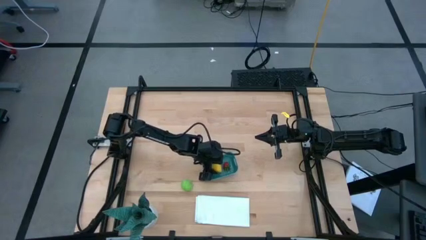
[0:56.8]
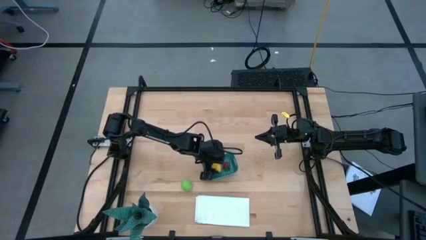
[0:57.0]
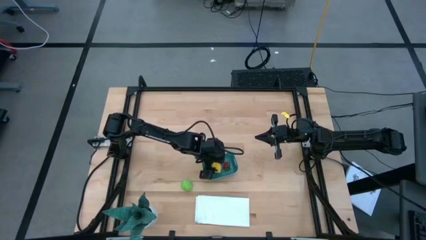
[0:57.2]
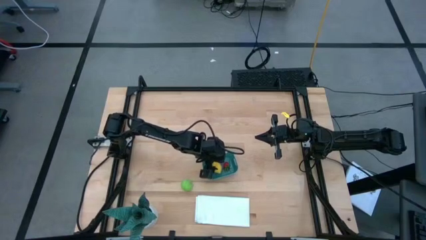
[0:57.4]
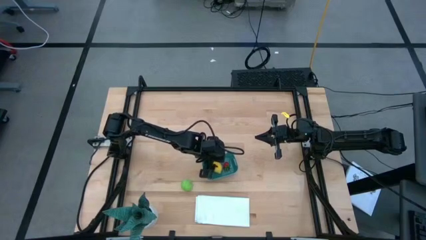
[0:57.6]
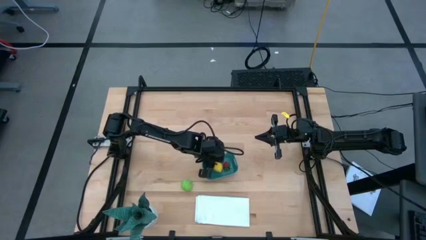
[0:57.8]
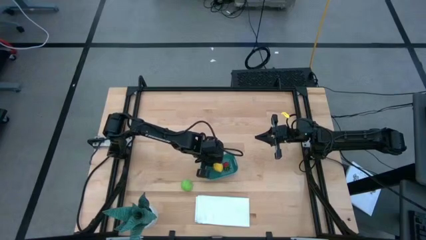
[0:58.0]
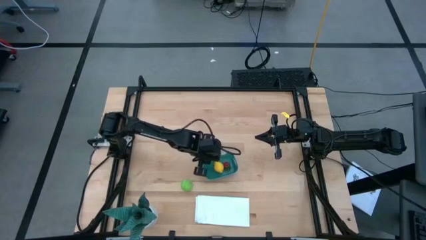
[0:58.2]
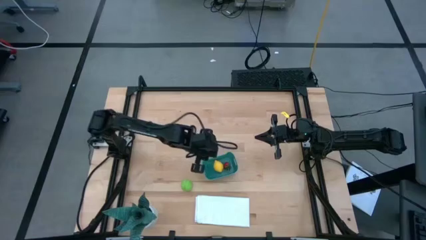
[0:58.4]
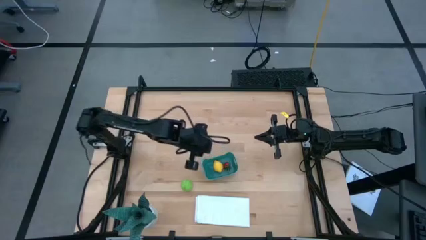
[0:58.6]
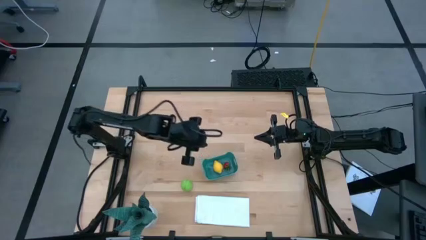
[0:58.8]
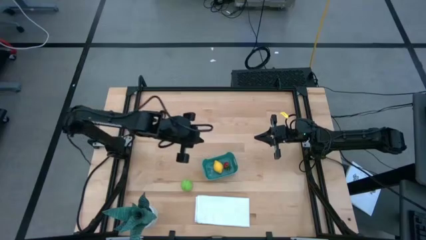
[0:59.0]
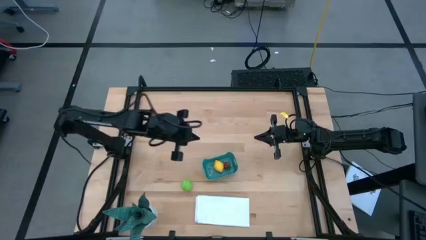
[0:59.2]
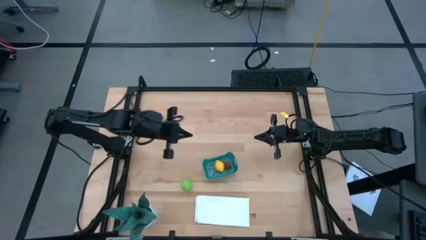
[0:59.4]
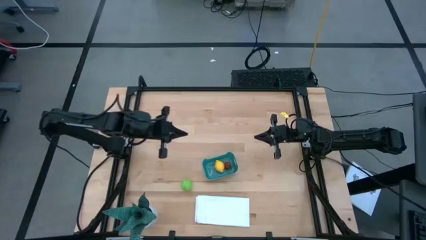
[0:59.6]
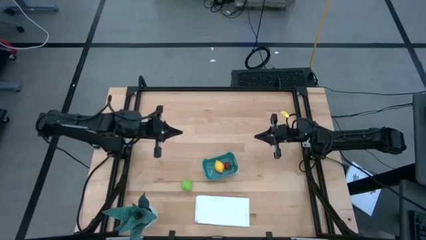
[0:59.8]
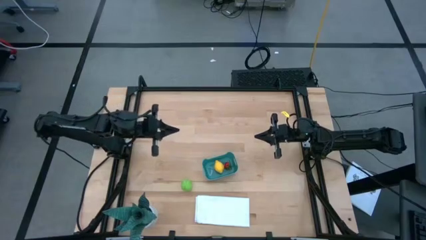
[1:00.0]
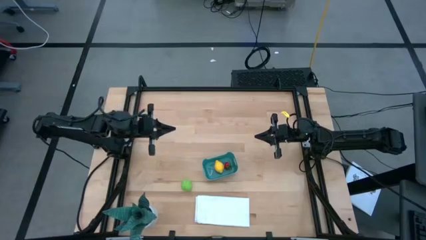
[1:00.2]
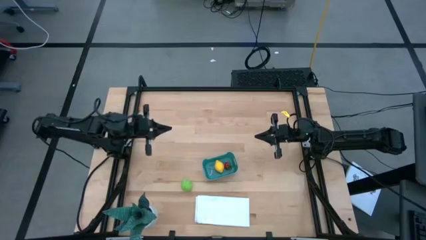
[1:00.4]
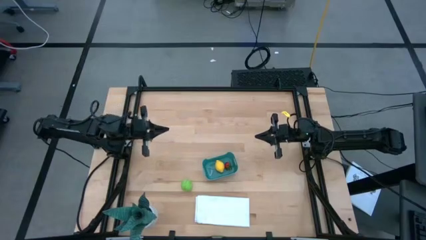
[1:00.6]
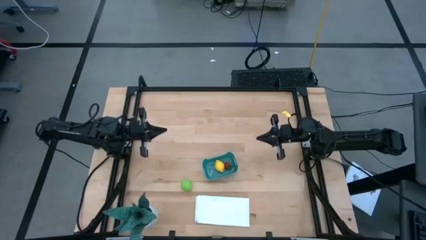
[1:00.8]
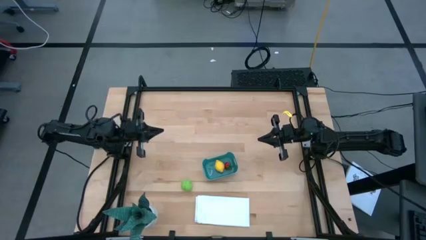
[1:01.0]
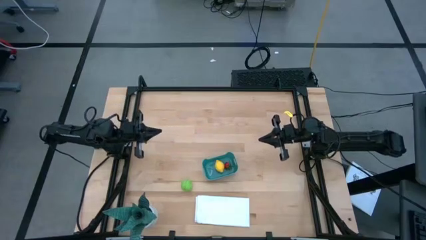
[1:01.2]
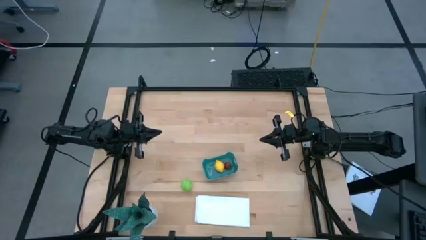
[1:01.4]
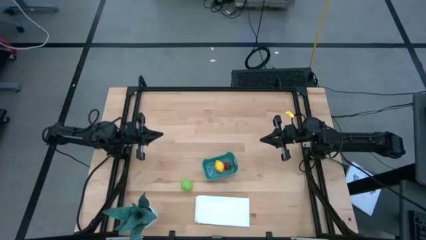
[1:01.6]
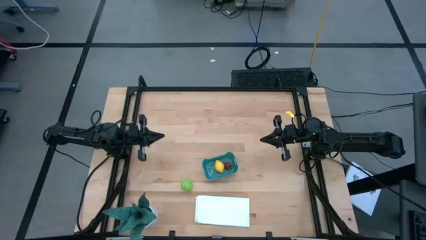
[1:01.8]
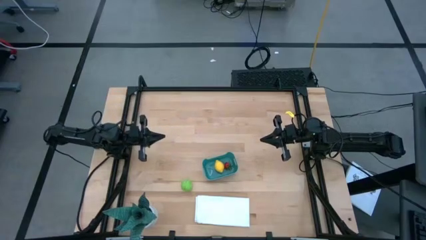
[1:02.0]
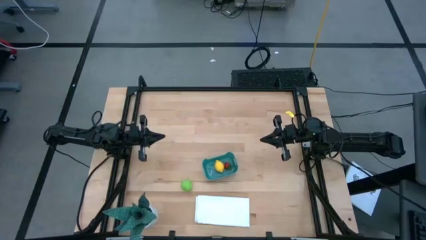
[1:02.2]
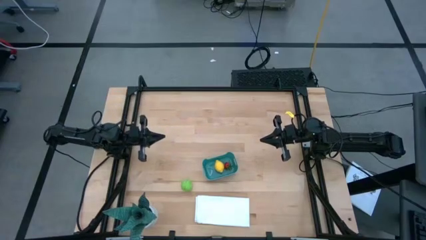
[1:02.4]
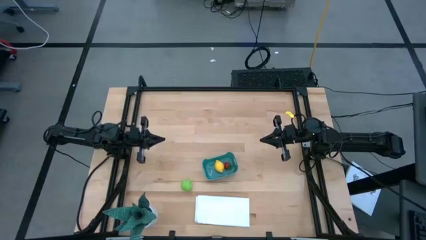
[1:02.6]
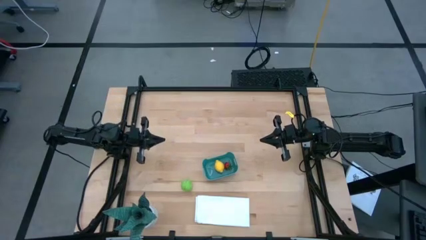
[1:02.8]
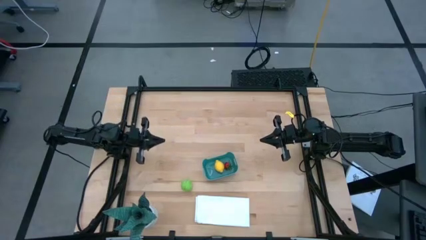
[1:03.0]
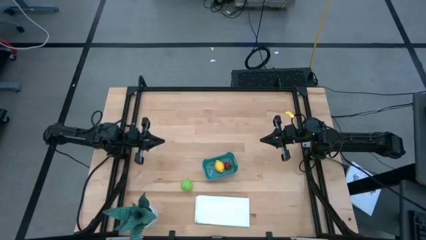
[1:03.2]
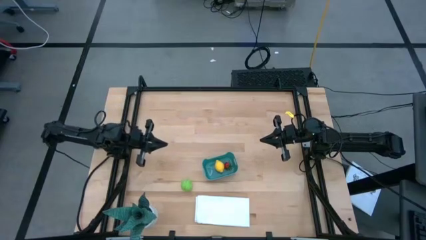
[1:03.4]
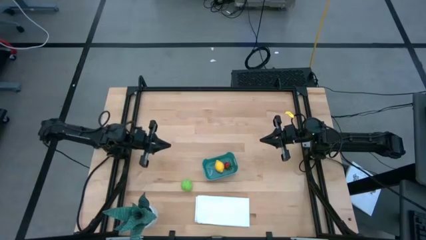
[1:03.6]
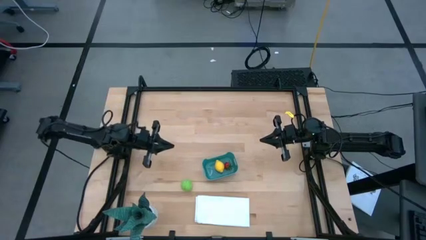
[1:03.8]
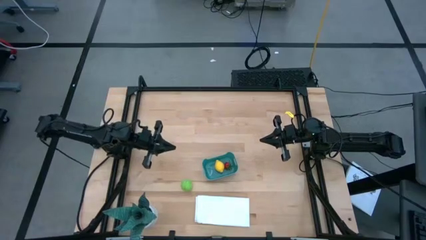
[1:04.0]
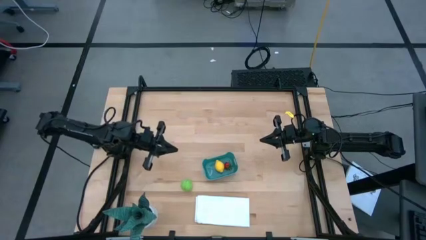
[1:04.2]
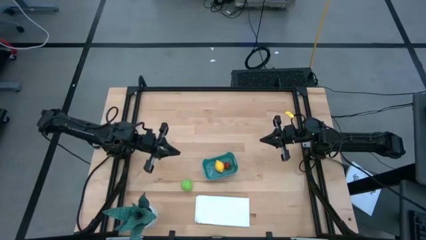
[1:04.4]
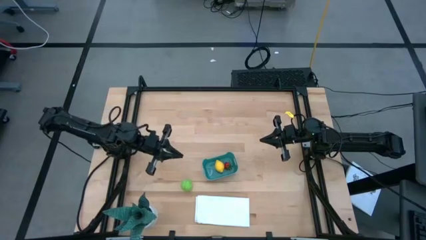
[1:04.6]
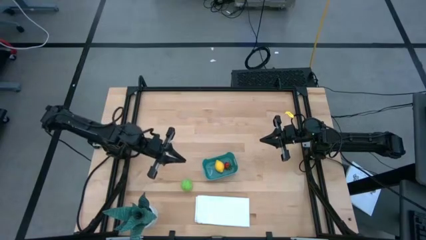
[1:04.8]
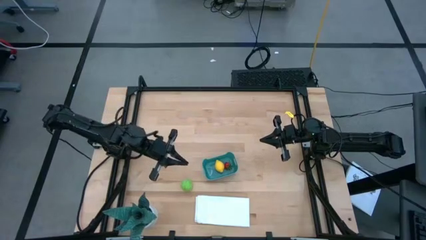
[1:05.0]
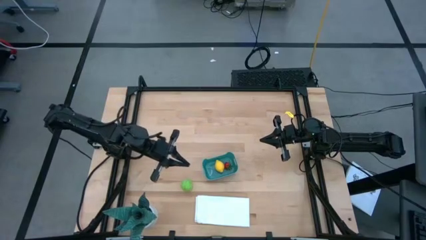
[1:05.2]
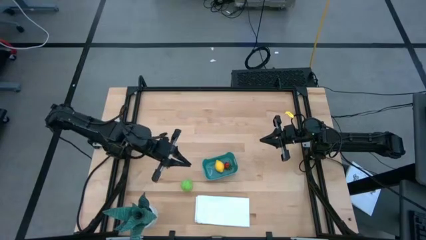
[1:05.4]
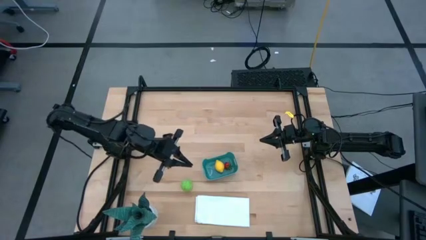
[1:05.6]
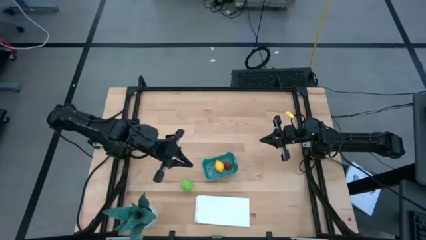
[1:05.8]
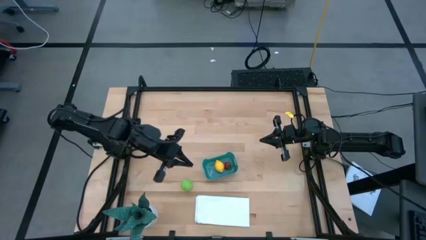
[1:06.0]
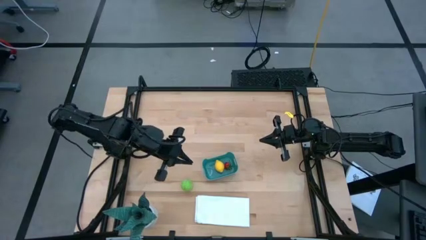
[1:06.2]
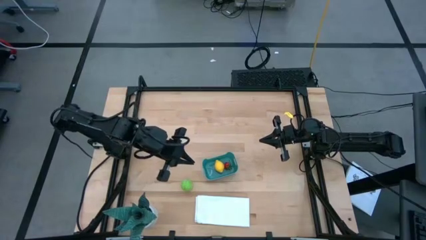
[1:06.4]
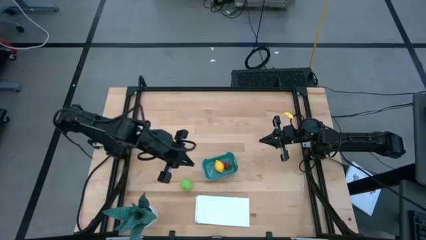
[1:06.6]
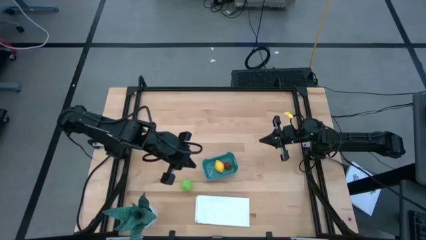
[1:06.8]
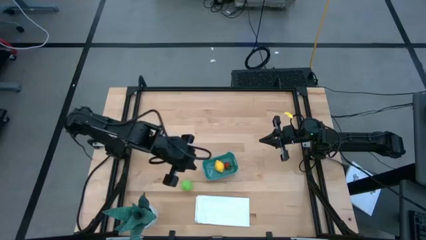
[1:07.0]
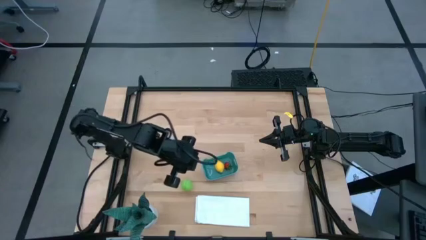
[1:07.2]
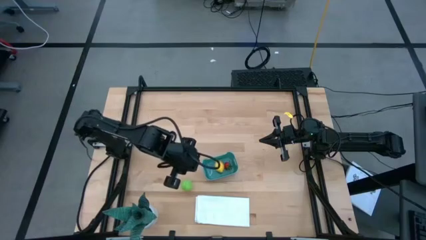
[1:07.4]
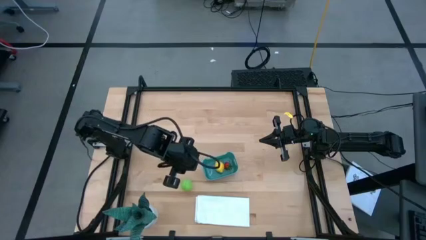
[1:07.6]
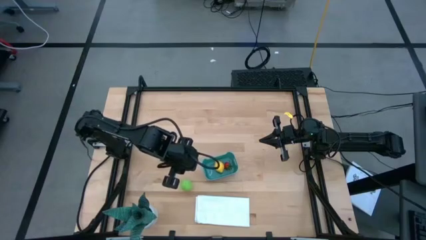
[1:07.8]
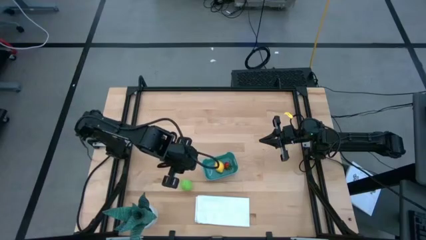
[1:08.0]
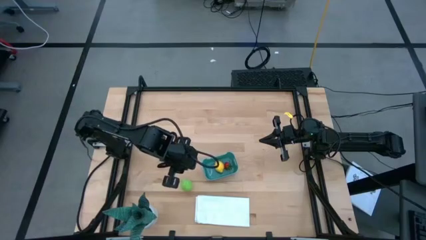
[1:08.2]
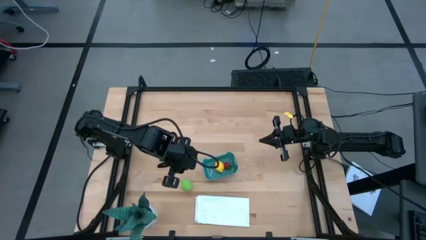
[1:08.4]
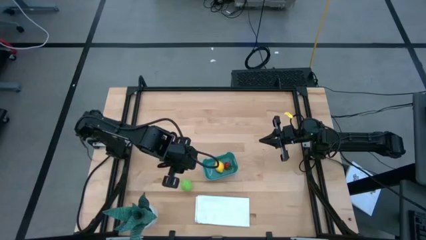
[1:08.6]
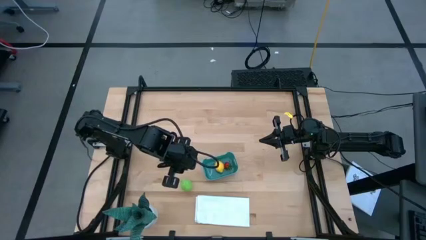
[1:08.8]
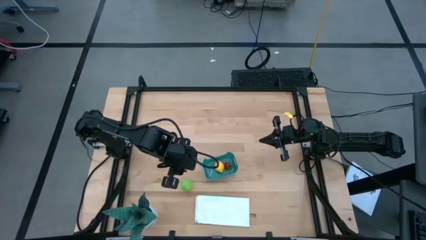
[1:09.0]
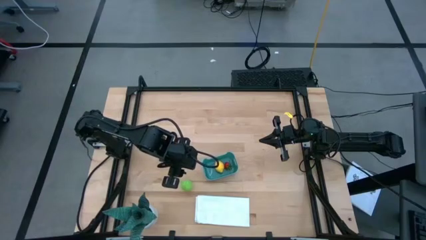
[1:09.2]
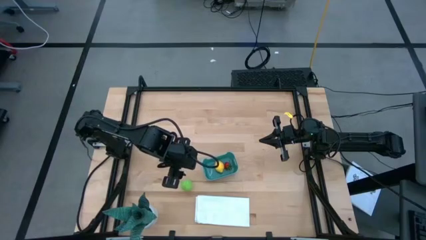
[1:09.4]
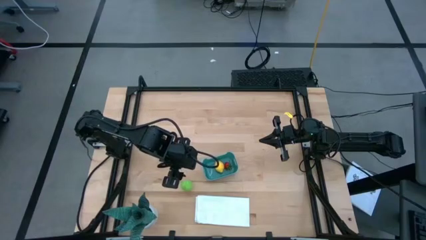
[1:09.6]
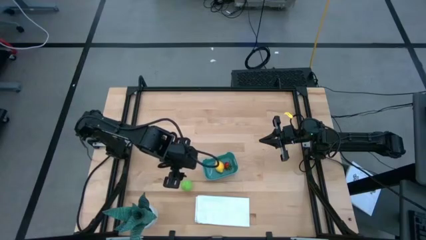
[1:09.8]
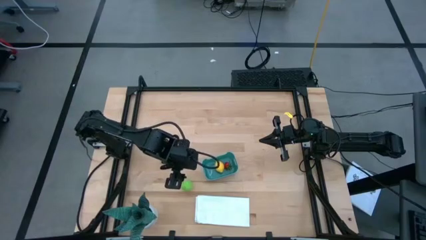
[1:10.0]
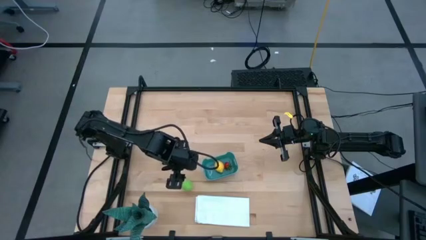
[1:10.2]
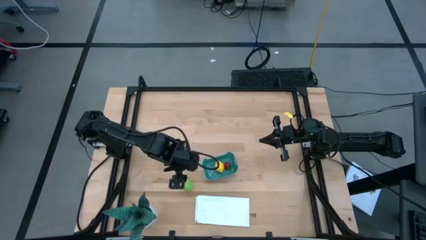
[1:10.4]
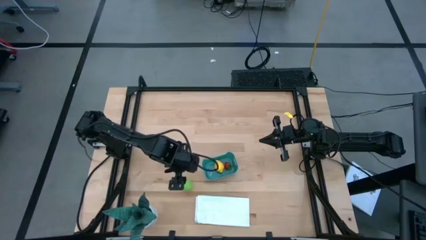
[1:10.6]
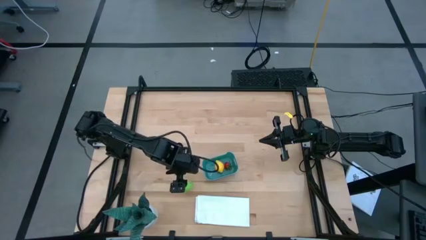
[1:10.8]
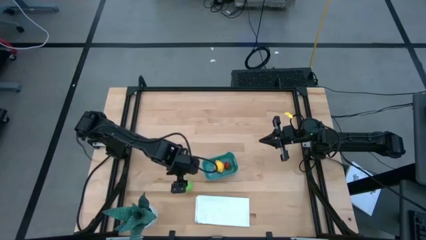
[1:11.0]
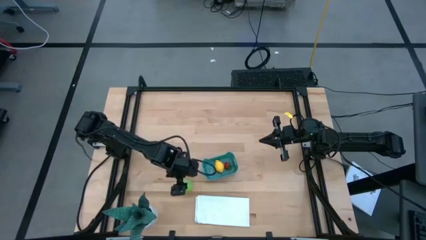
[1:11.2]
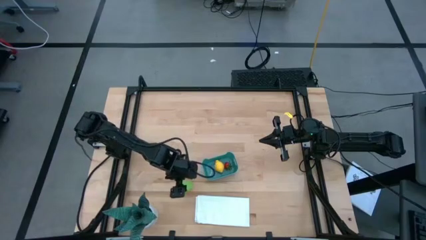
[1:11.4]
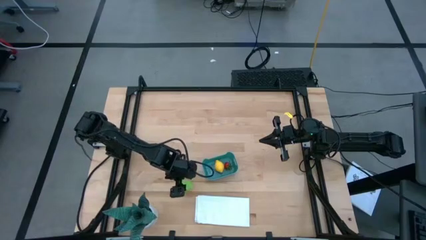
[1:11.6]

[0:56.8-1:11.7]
Task: Pick and placing Produce into tupperware
Put the cabbage into the green bin
